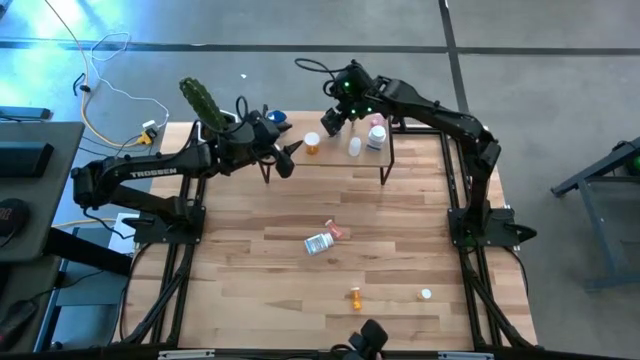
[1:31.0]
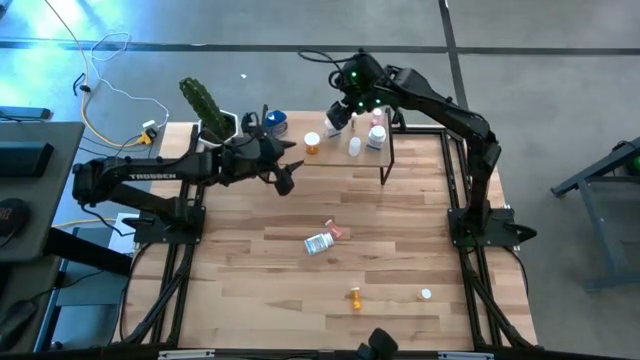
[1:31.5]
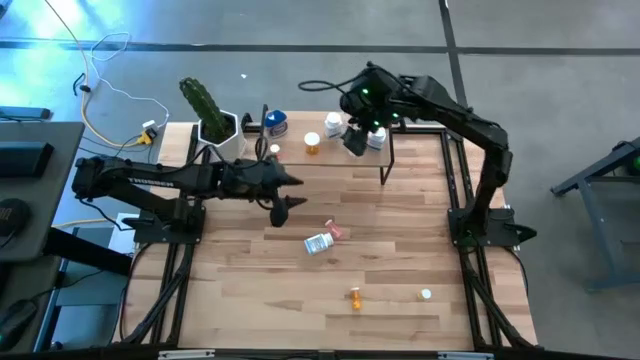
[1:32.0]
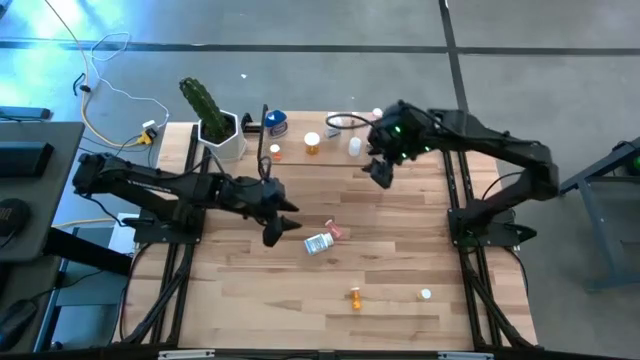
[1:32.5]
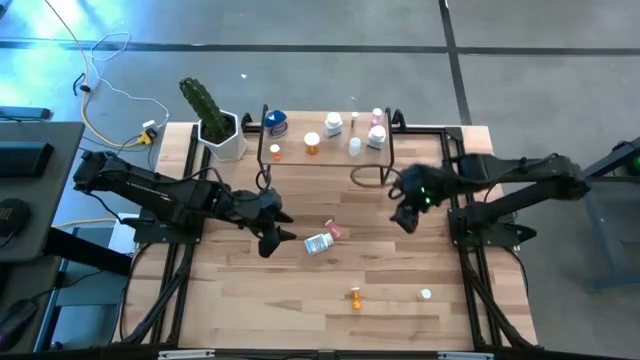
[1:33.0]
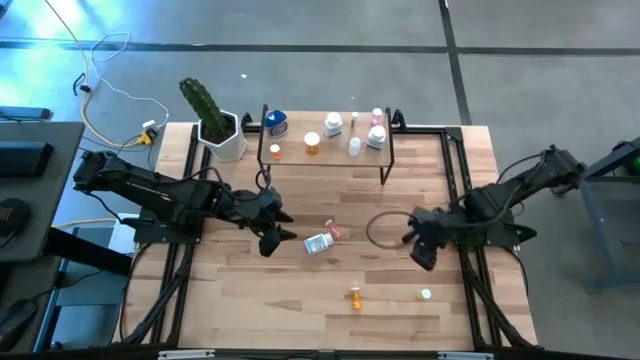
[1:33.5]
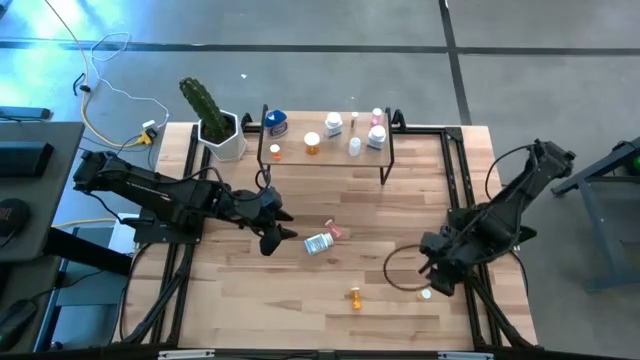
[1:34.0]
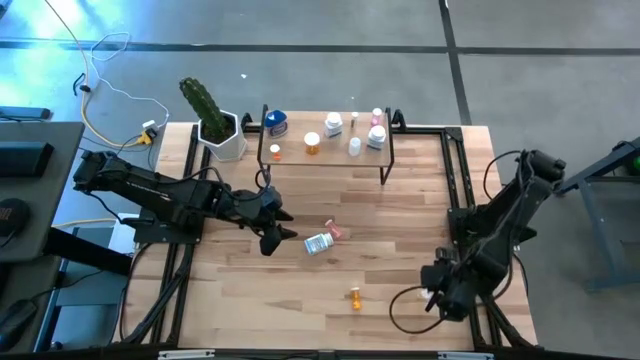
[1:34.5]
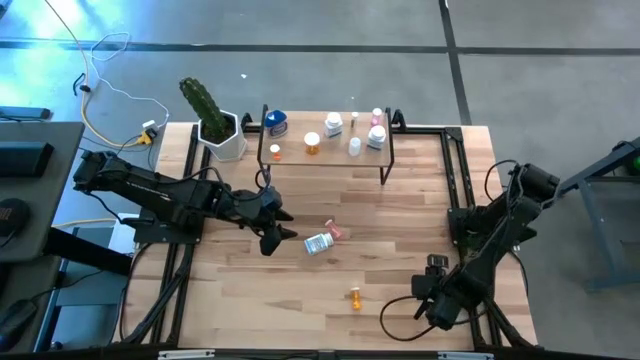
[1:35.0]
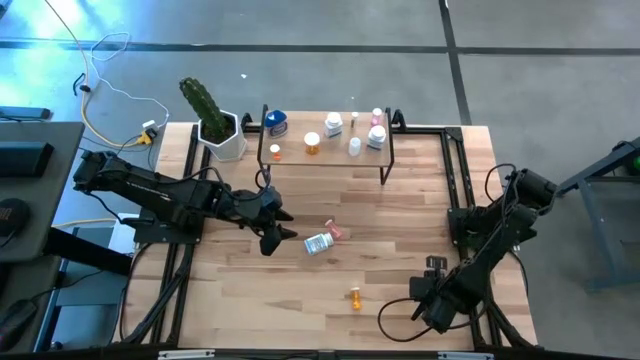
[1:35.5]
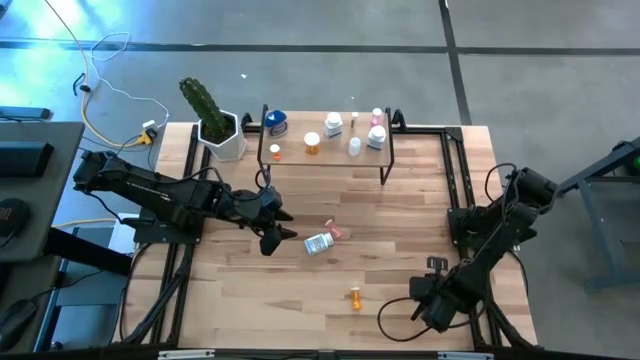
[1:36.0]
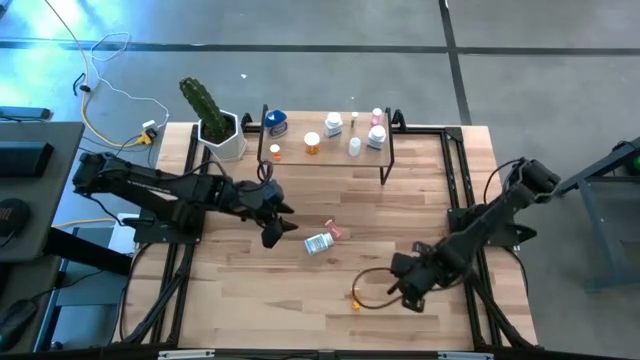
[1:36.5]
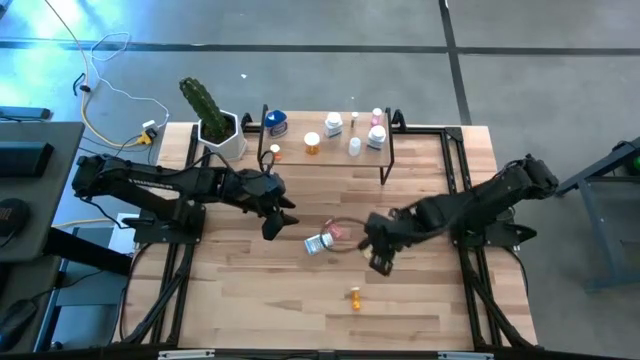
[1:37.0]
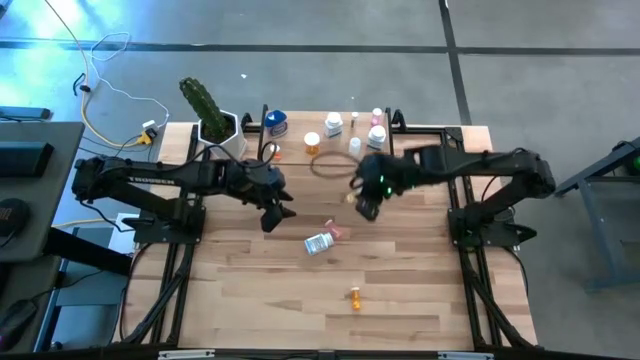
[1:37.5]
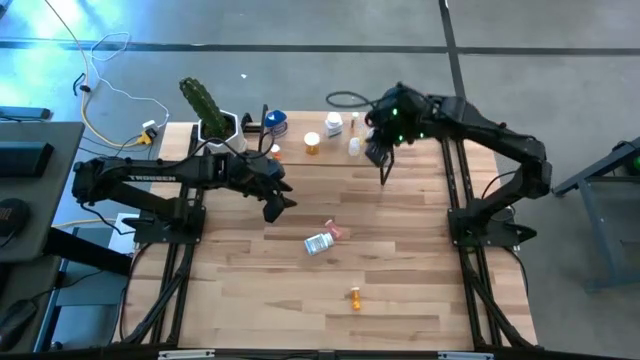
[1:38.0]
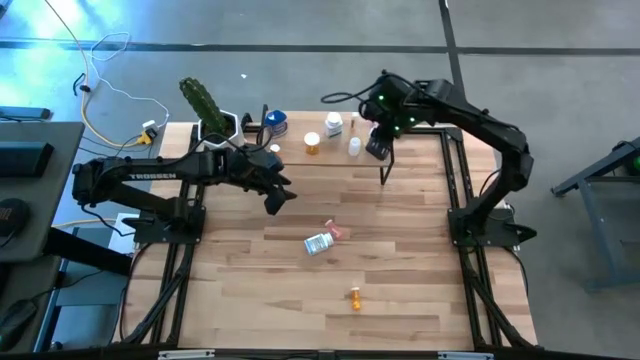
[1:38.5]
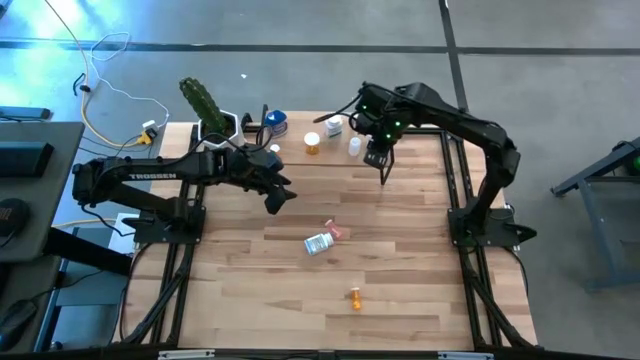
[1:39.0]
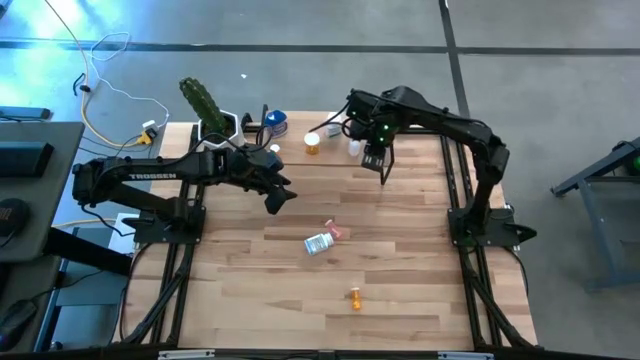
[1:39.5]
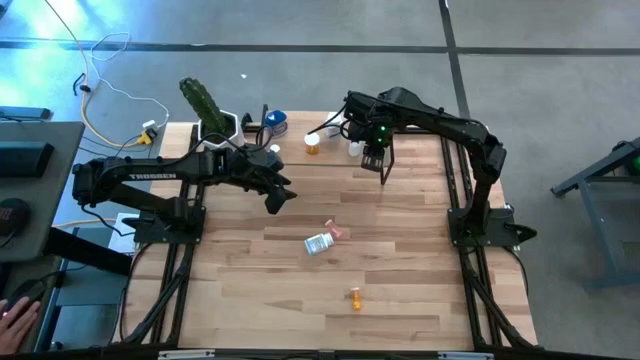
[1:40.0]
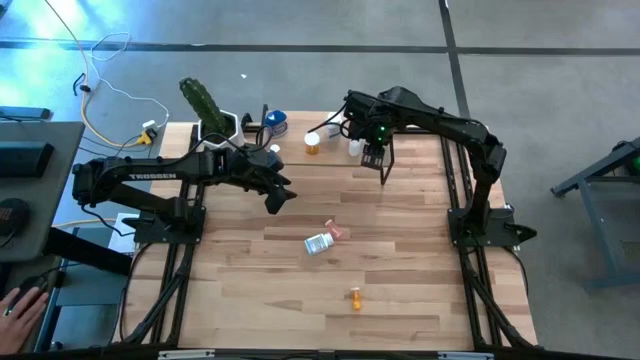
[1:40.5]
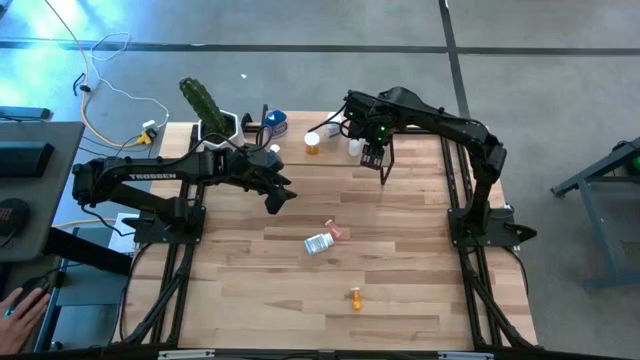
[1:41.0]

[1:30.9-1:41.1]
Task: Pick and place medicine bottles onto shelf by color
Put the yellow pill bottle on the shelf

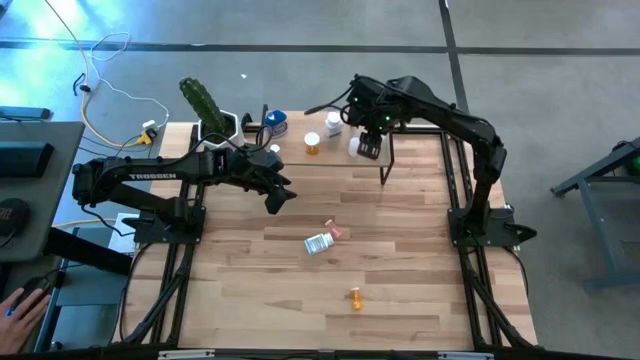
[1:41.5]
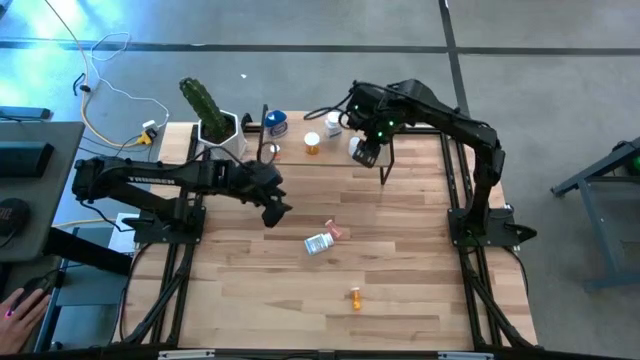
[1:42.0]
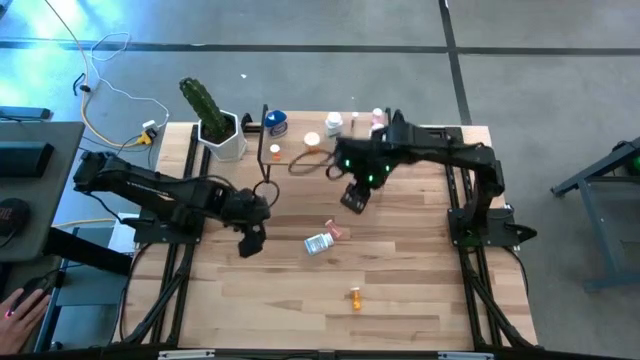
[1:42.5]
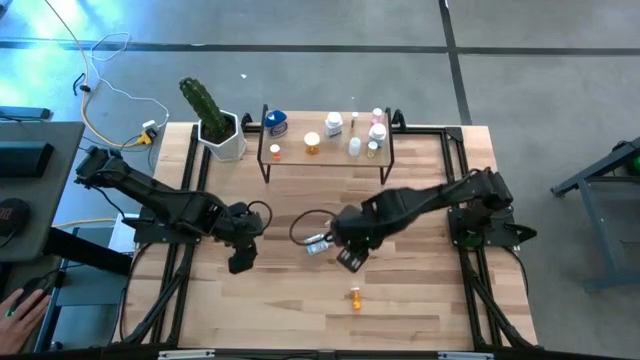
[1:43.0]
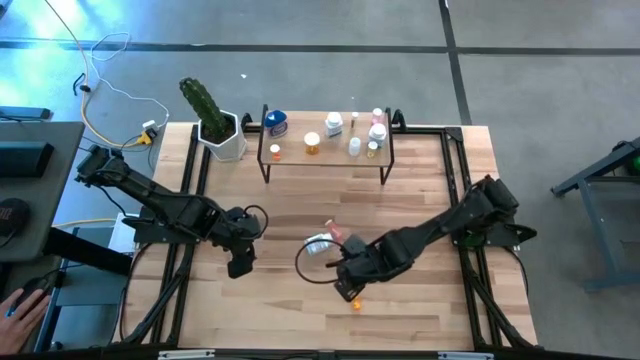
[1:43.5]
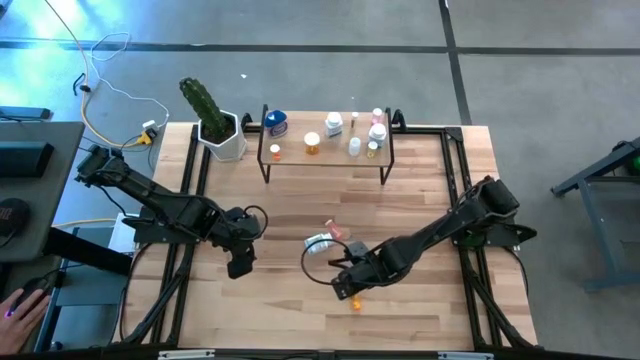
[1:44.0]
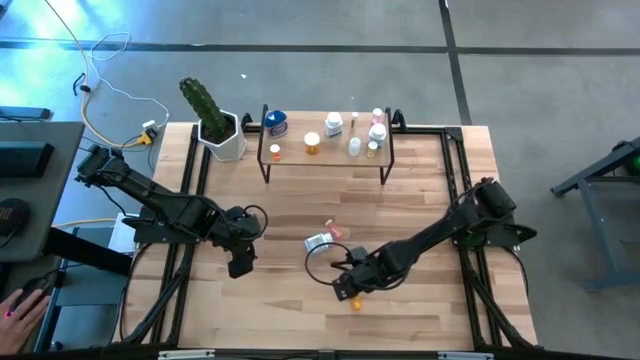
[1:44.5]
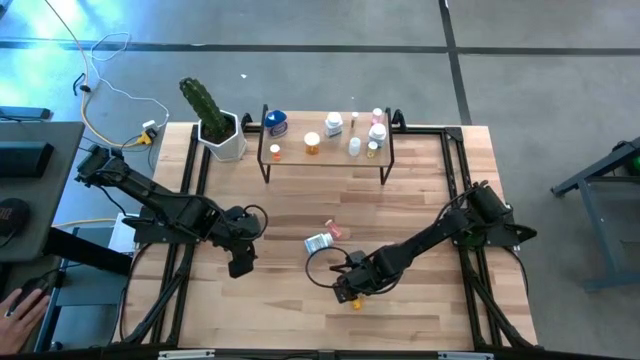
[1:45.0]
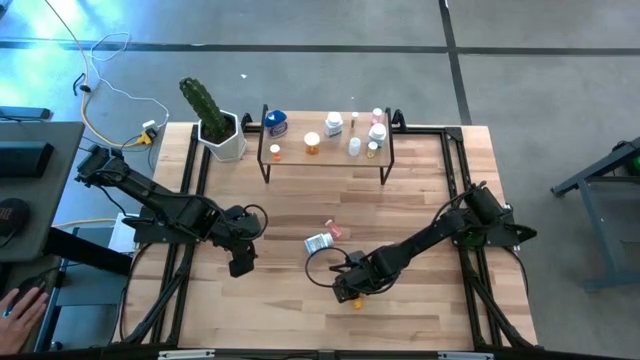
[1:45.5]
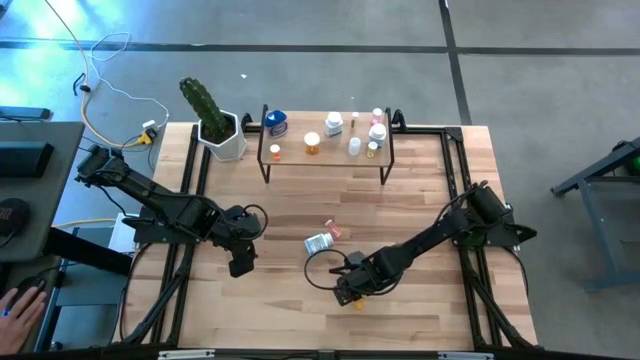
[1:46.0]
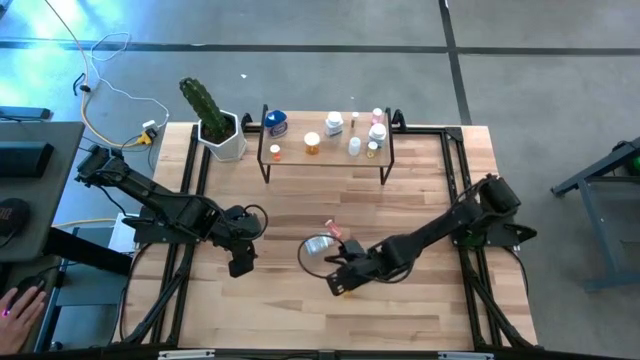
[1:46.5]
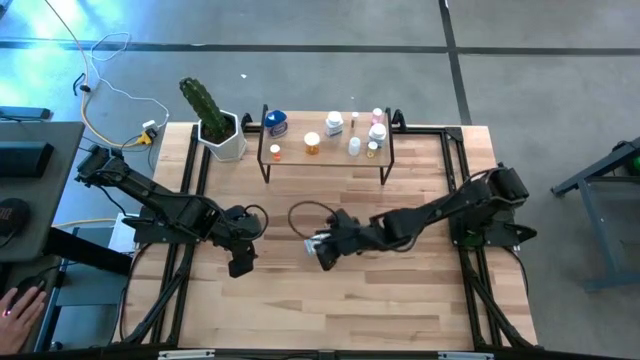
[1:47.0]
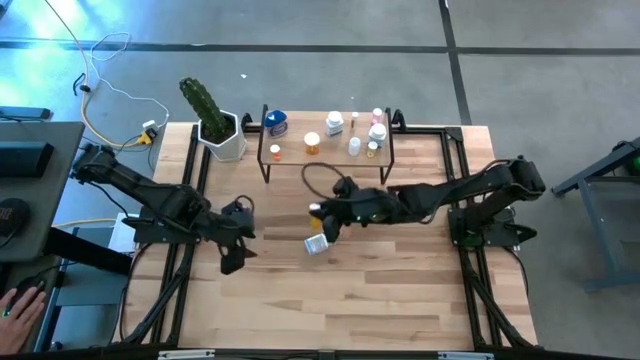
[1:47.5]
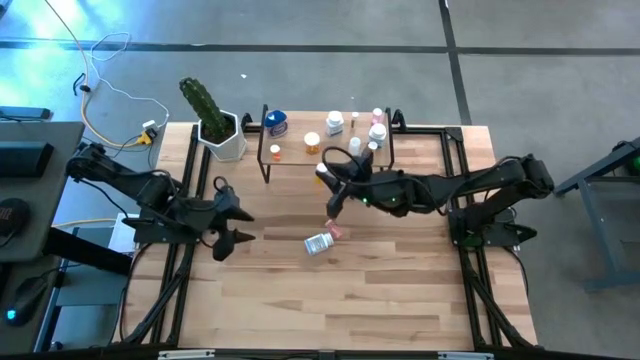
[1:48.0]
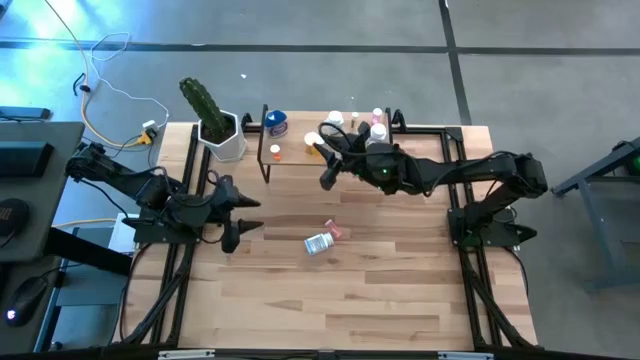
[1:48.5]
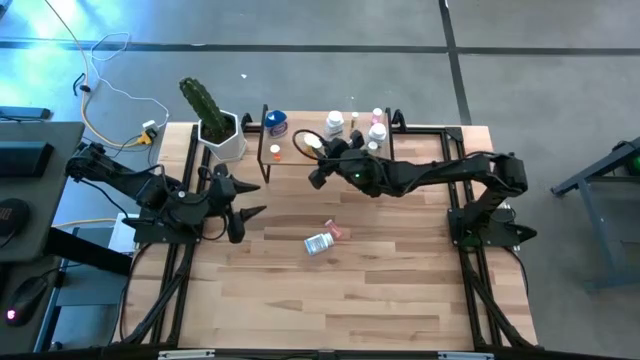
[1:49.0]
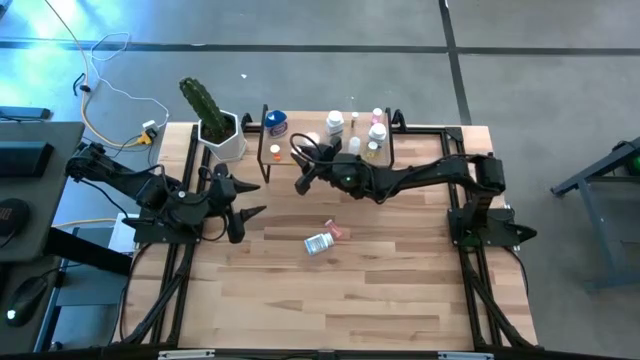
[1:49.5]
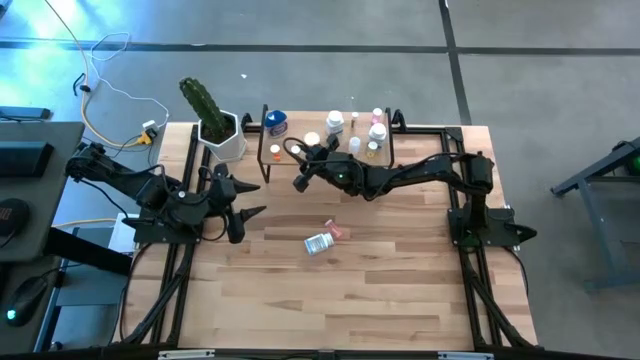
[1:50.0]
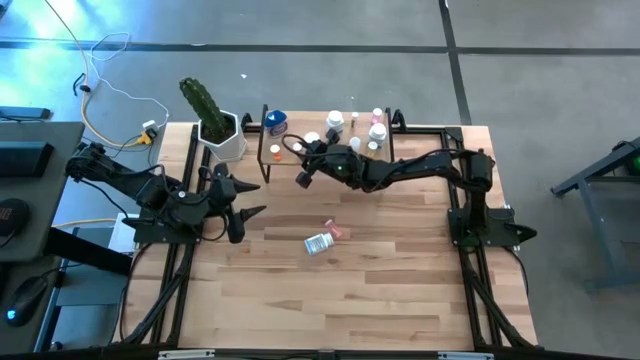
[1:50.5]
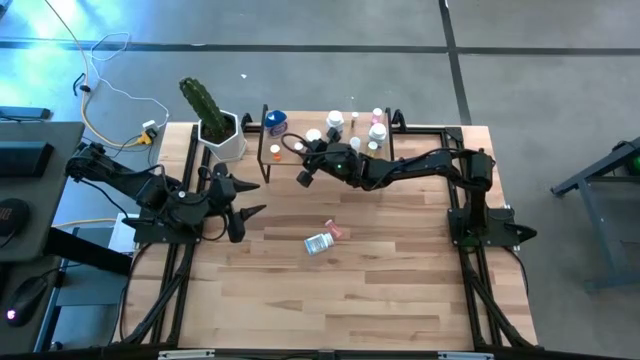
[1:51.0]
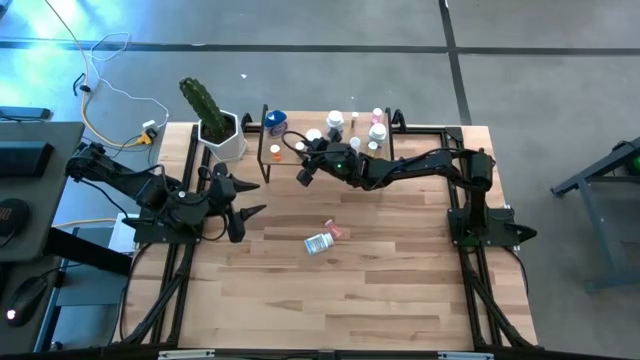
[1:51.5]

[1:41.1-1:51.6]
Put the orange pill bottle on the shelf
